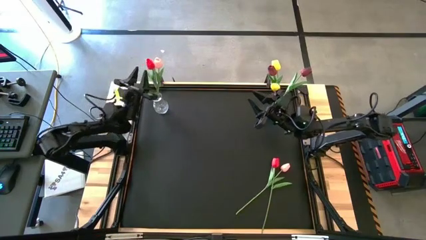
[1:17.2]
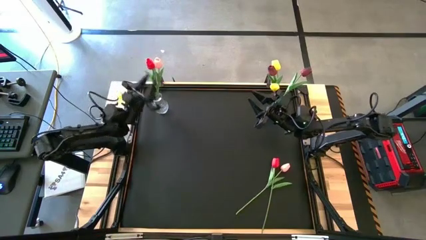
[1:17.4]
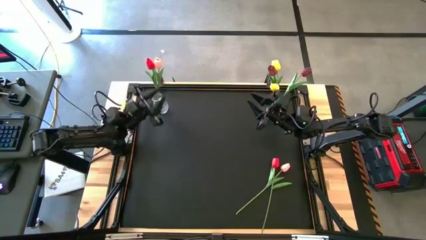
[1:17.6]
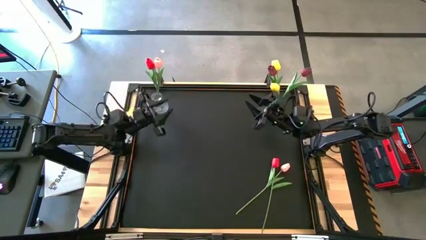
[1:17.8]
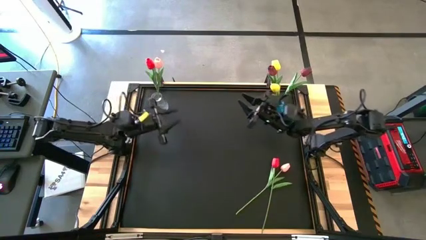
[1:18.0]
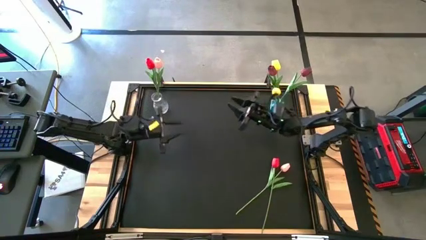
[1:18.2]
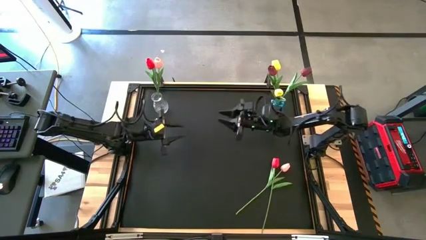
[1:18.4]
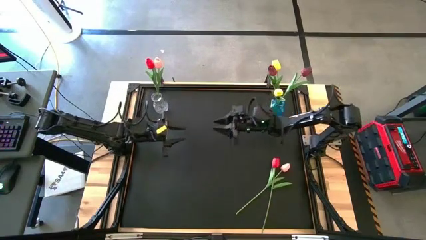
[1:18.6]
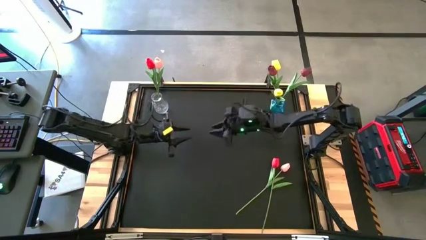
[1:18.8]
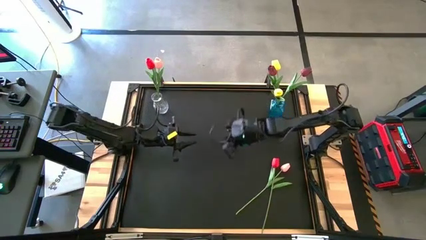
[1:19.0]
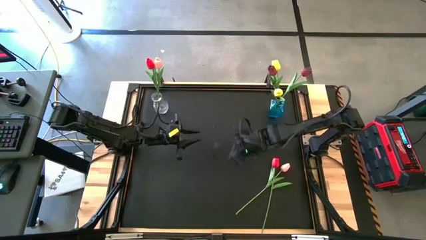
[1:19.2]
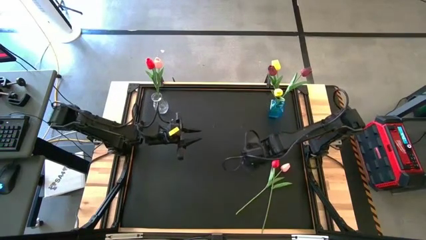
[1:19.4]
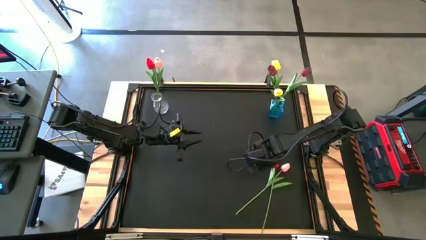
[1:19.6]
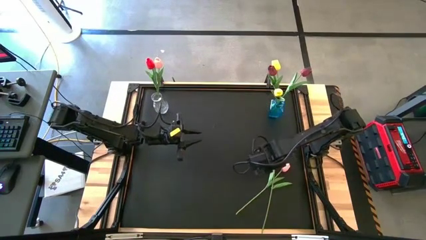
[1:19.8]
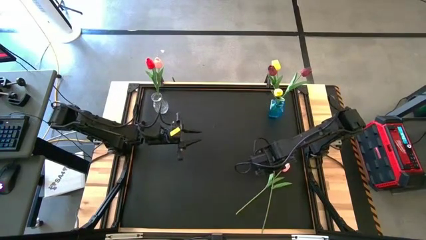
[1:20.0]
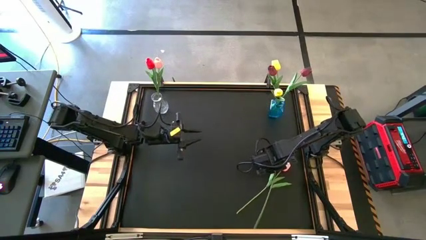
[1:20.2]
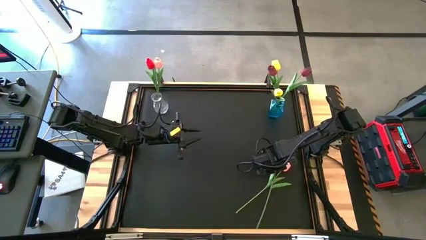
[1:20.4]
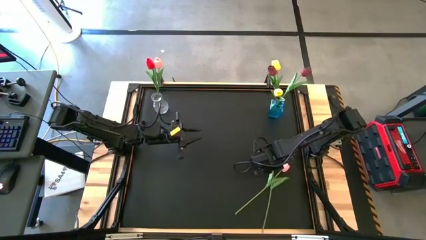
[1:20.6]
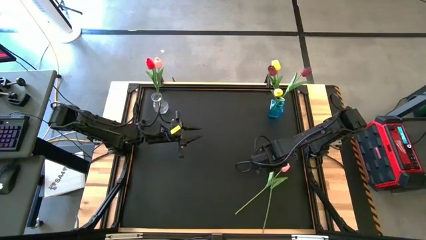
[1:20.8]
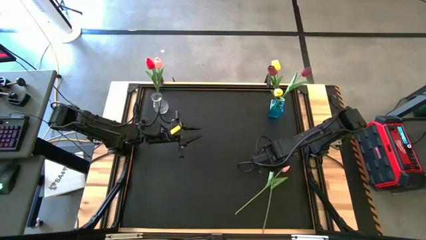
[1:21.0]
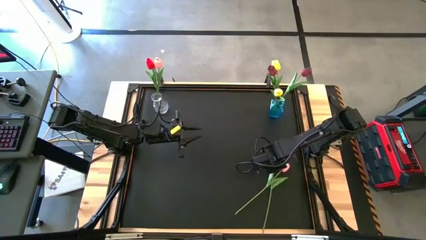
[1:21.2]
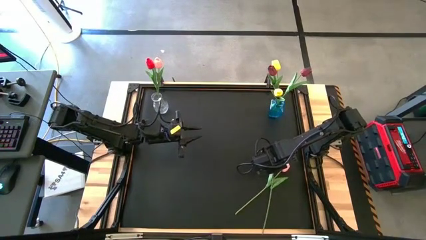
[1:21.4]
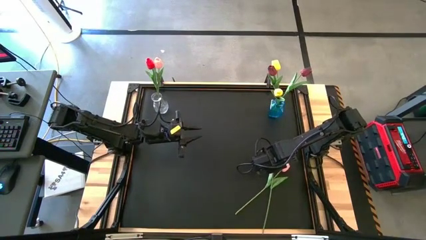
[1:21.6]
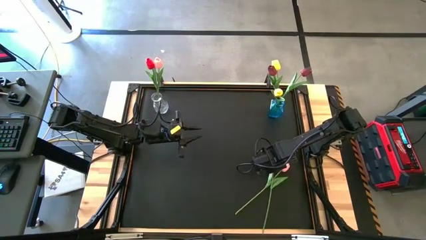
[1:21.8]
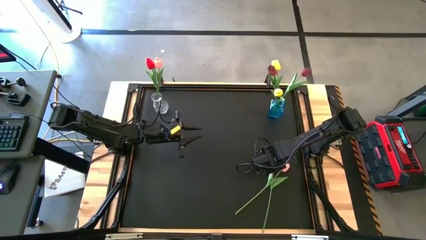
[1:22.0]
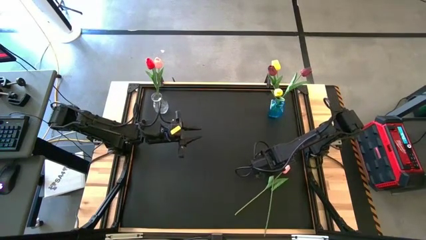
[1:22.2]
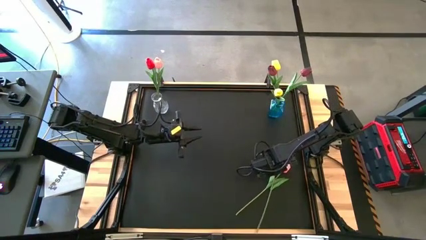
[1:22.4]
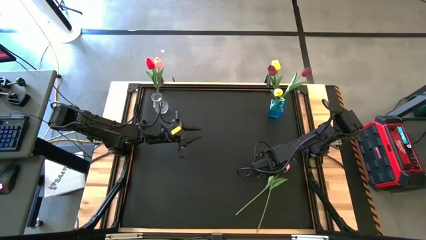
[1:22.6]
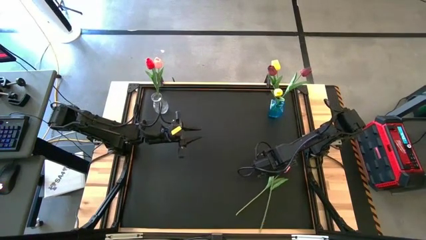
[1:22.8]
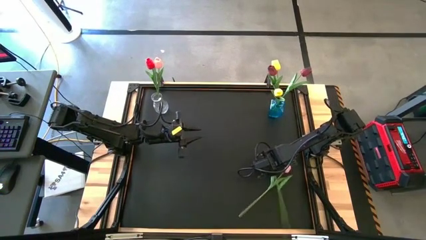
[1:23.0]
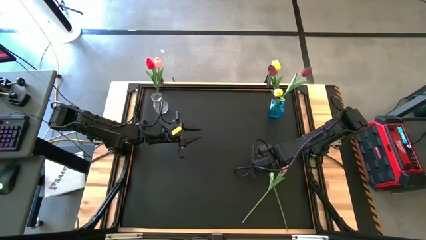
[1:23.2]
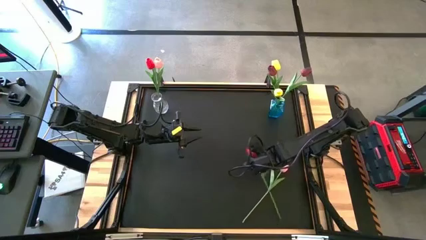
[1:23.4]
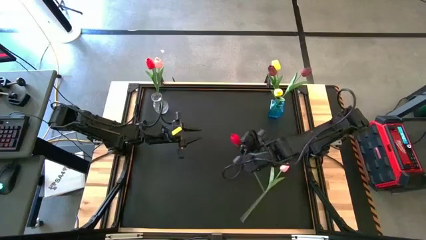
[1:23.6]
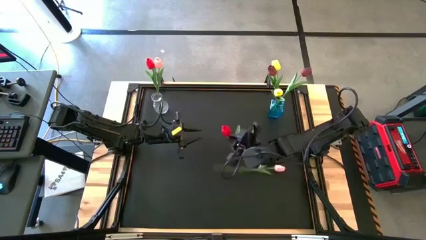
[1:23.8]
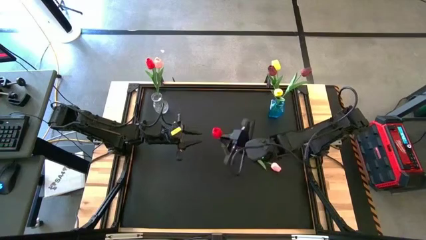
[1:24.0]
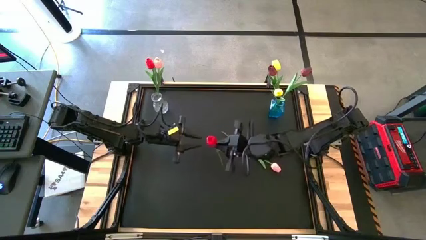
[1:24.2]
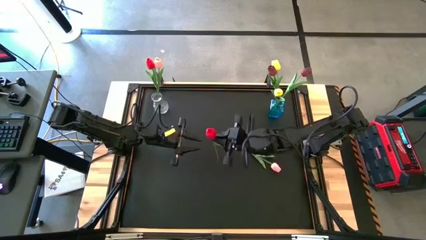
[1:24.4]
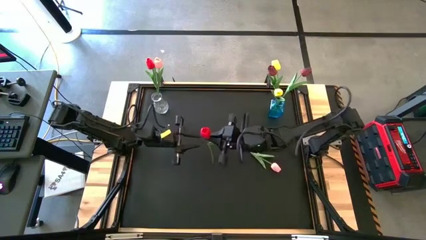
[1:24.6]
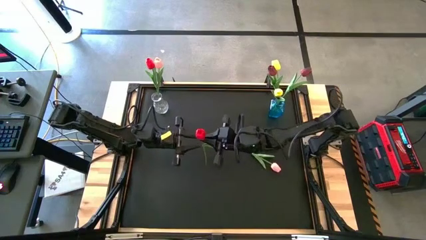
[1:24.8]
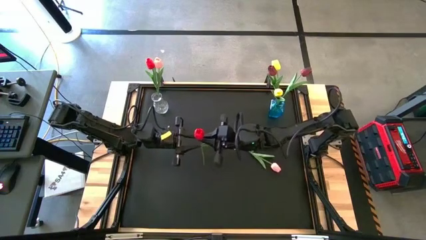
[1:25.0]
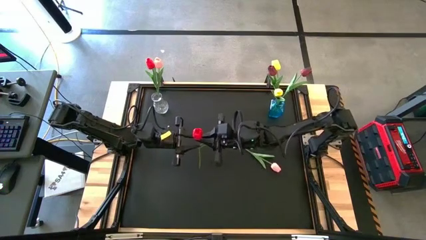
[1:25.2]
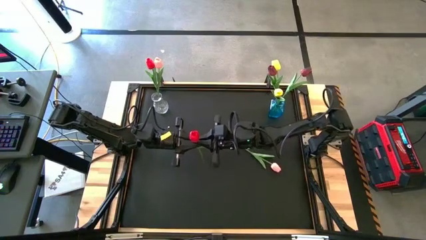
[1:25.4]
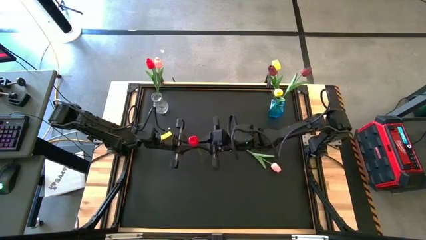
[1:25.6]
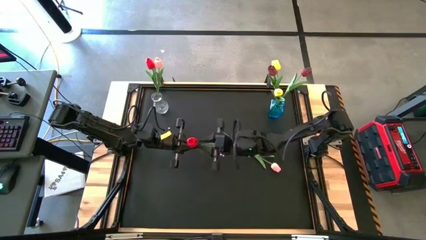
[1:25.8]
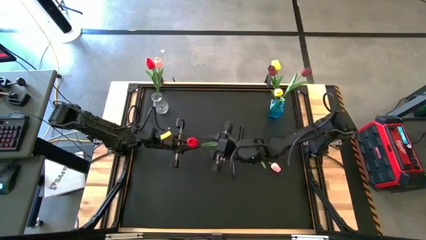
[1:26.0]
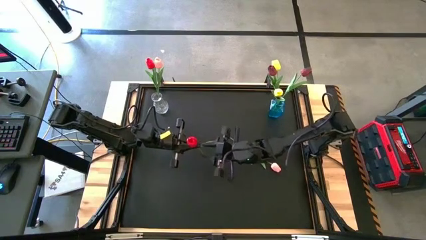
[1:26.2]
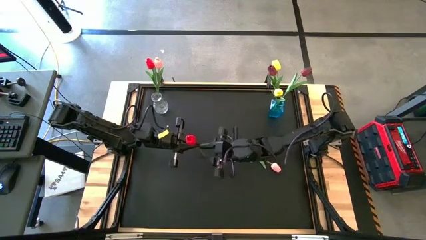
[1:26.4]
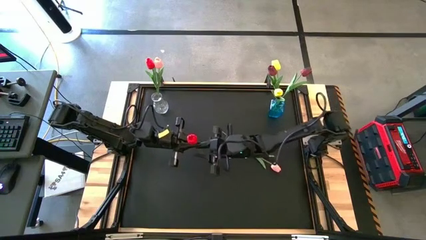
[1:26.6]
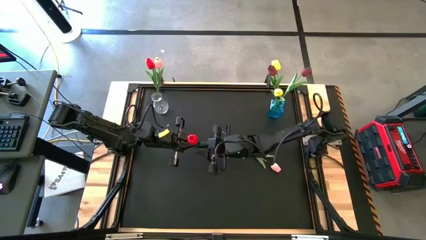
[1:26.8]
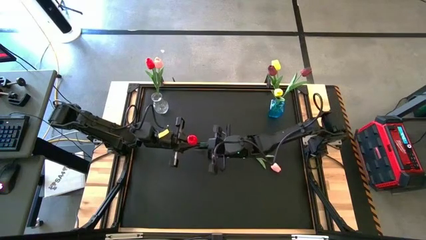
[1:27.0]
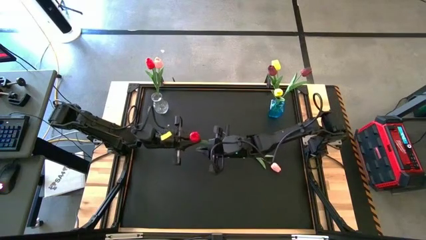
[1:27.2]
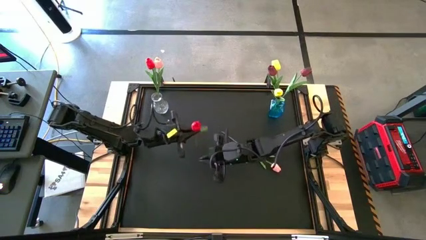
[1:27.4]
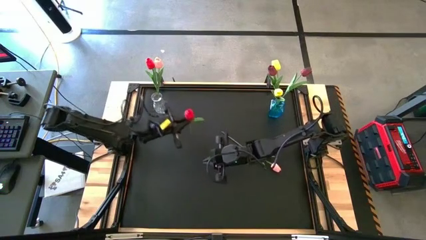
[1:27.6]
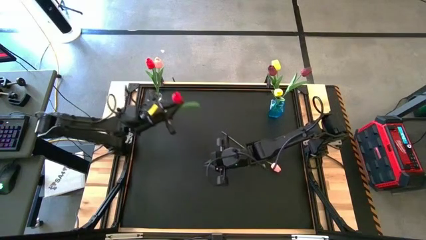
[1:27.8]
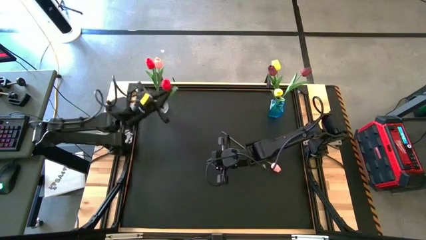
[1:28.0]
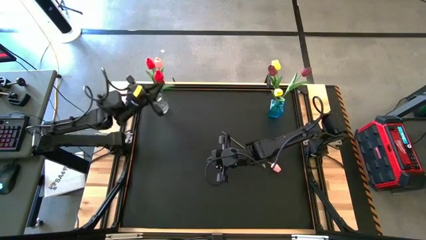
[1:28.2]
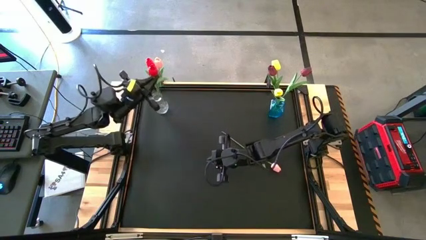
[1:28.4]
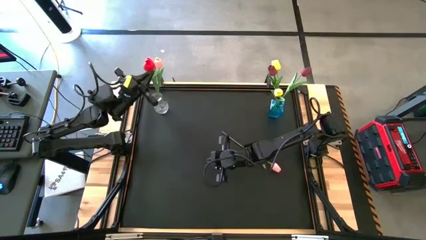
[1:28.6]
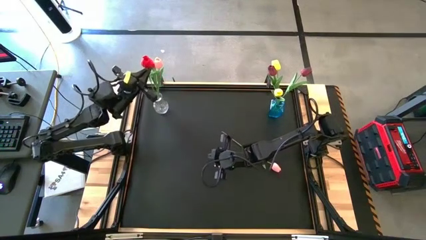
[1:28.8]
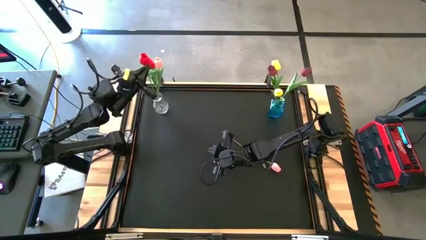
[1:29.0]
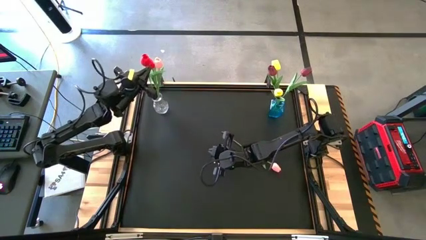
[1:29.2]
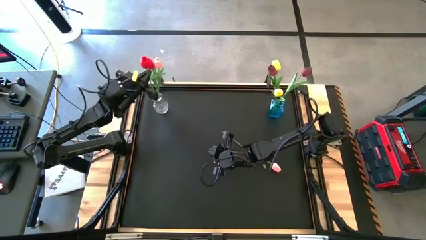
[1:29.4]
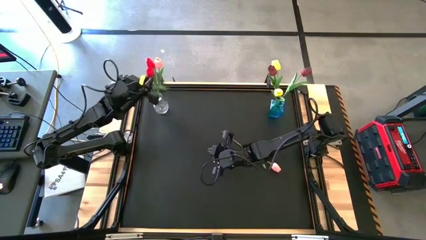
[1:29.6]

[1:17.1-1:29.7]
Task: Sort flowers into vase by color
Put the red flower into the transparent vase
